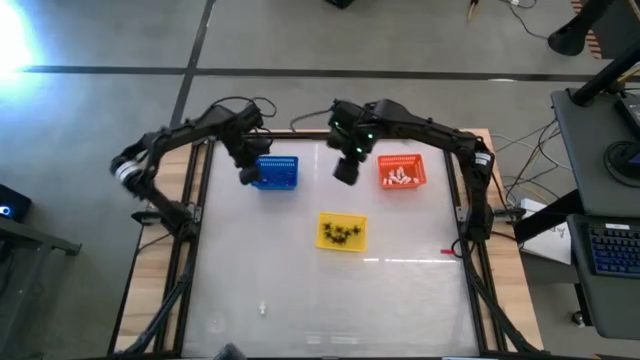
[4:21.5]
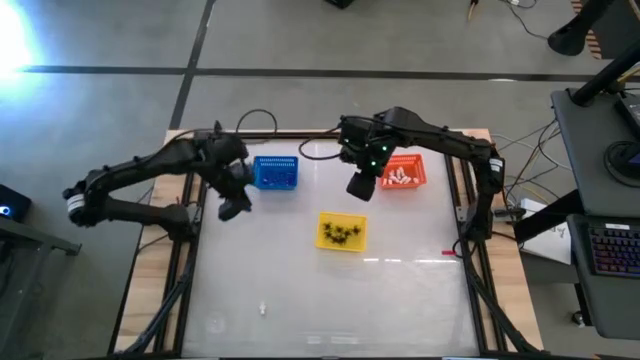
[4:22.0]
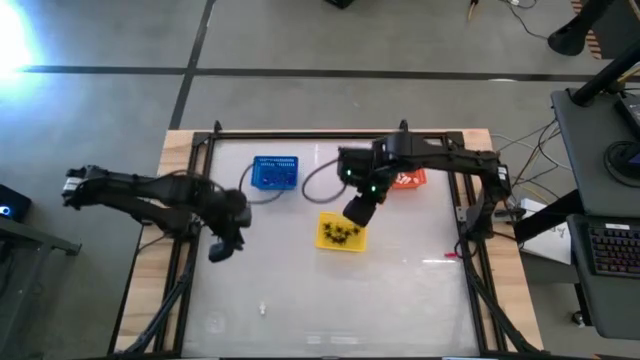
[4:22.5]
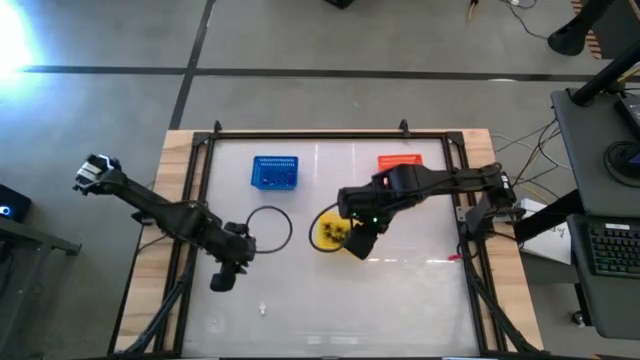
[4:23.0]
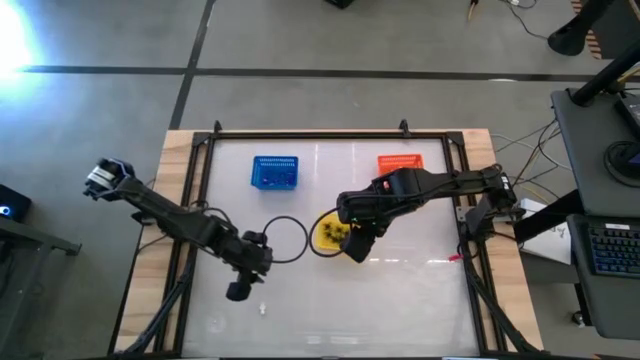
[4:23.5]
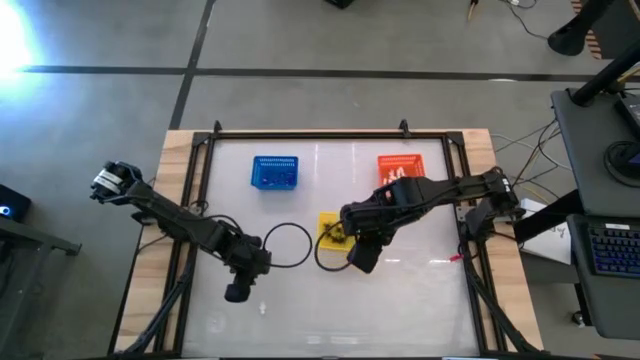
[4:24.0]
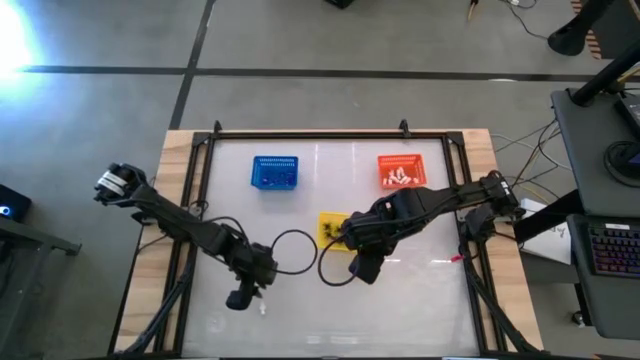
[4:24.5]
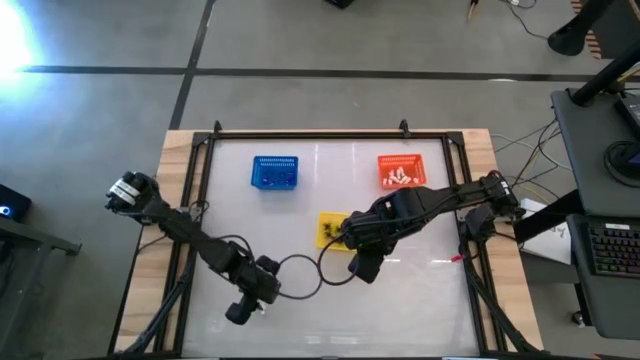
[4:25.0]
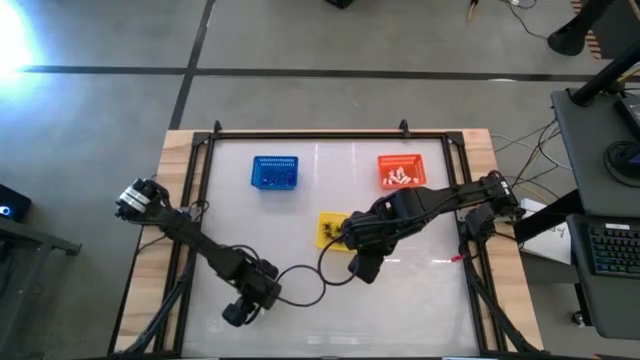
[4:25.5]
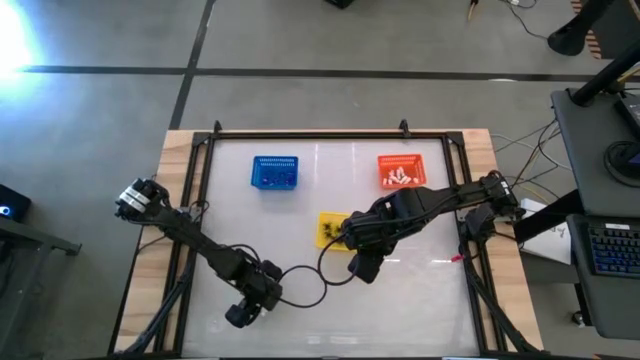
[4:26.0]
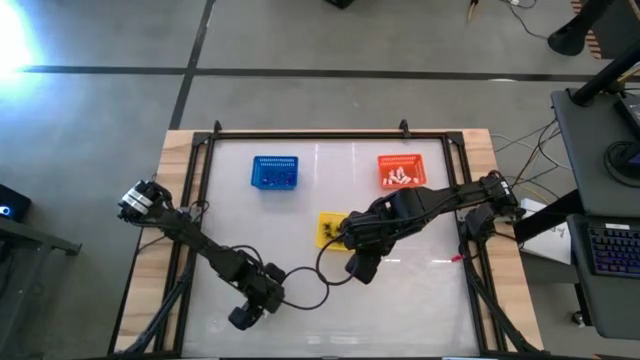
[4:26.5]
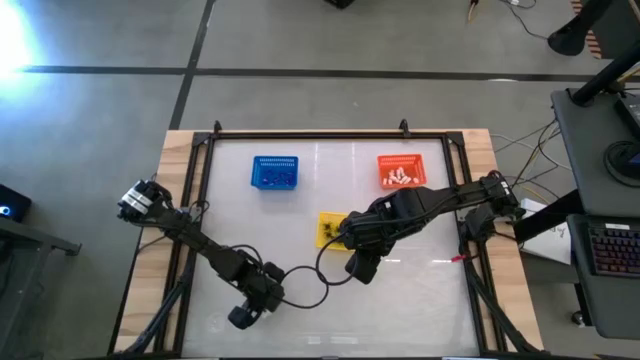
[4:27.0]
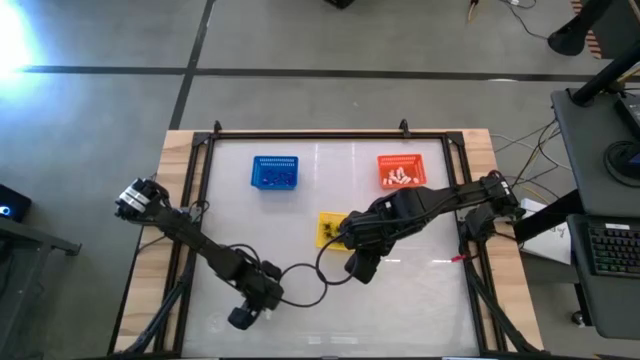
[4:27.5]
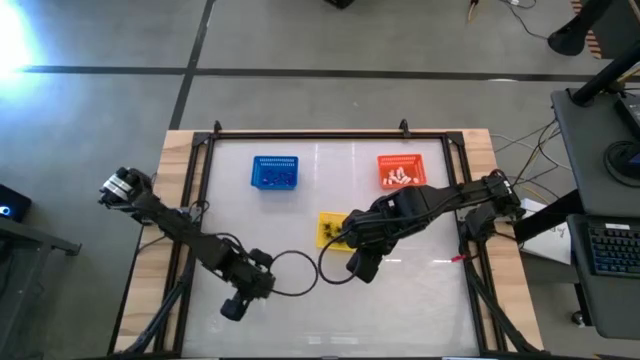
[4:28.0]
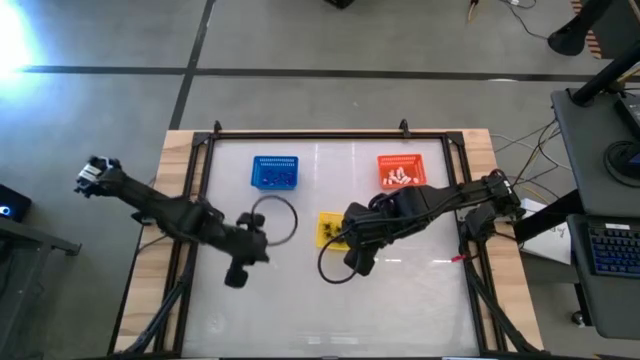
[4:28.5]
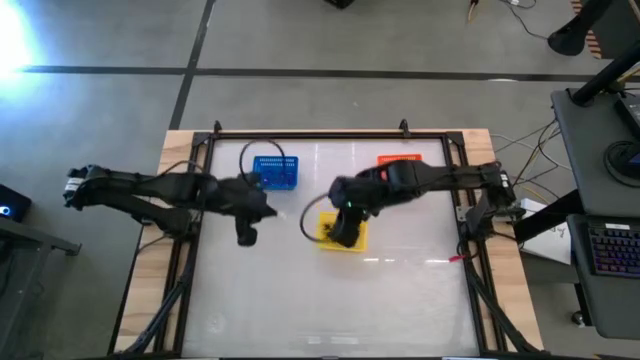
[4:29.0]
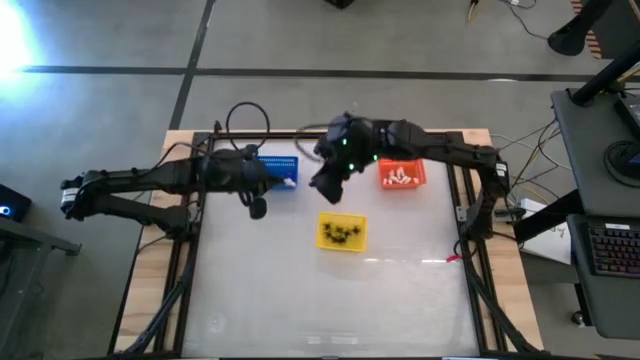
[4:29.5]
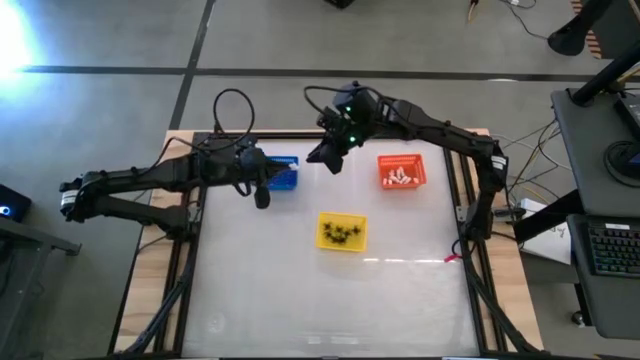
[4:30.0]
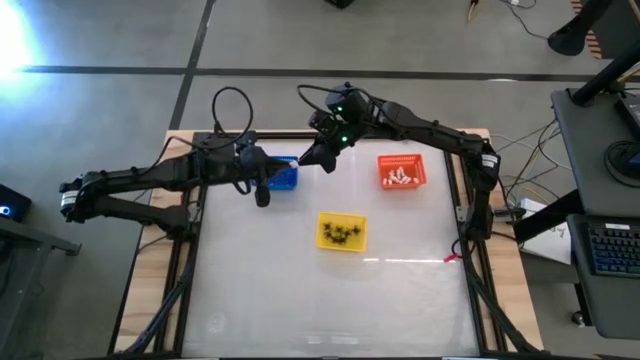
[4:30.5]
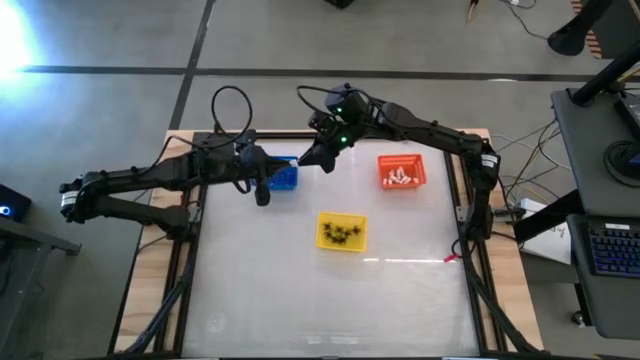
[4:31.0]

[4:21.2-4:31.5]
Task: Sort Halloween decoration
Put the white skeleton toy into the orange bin

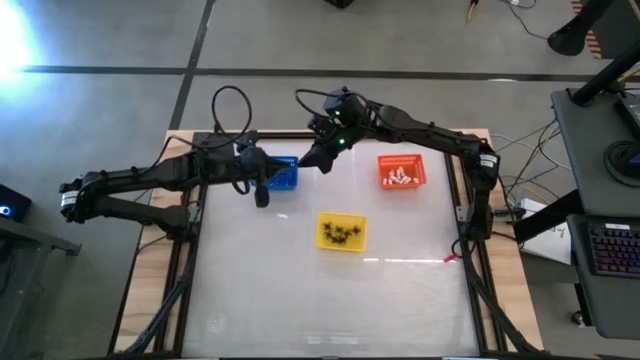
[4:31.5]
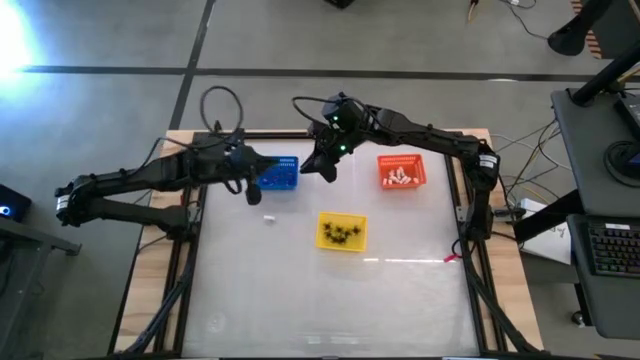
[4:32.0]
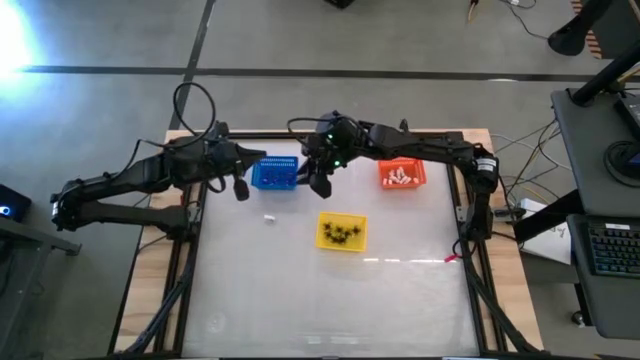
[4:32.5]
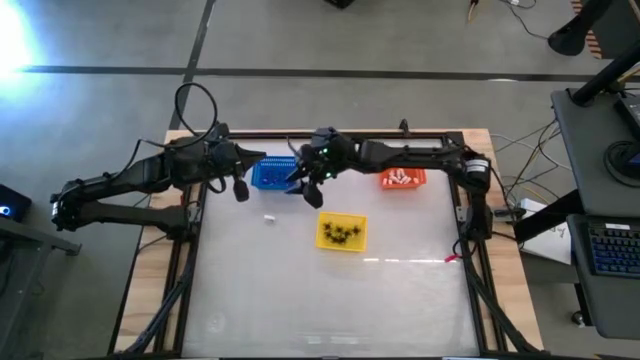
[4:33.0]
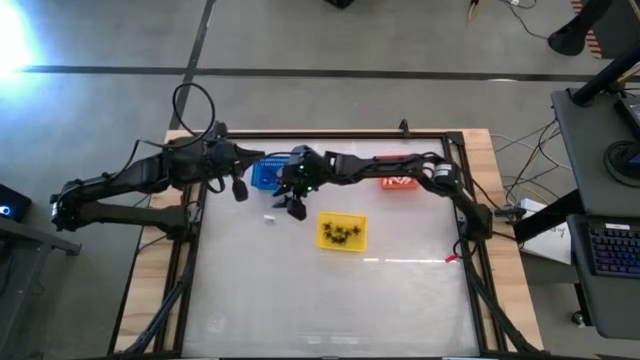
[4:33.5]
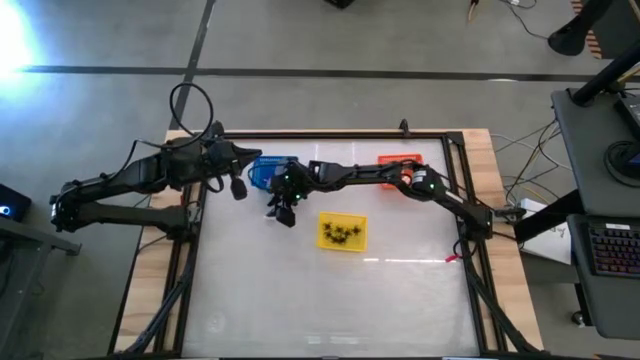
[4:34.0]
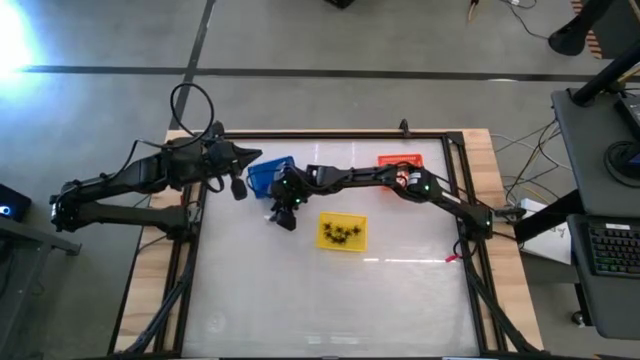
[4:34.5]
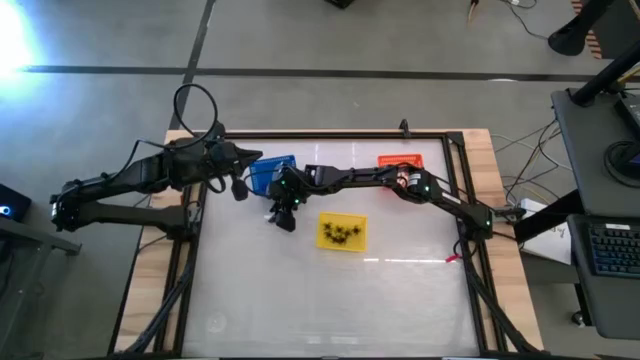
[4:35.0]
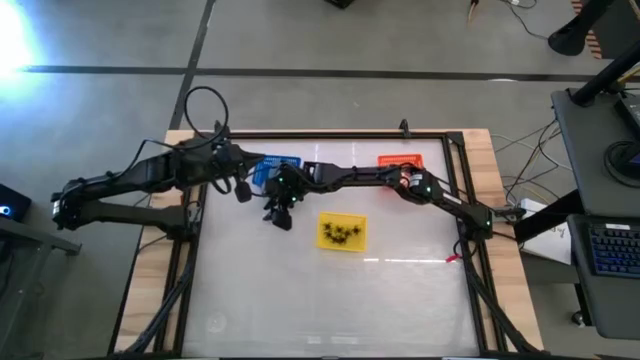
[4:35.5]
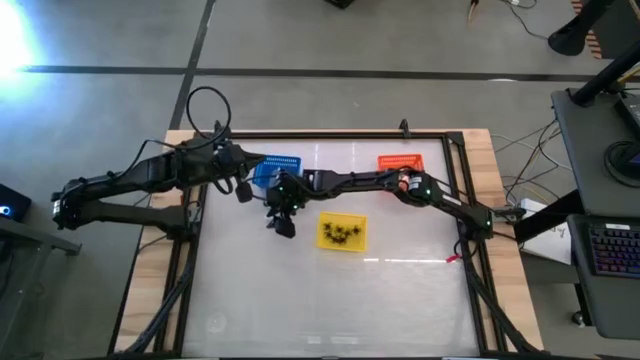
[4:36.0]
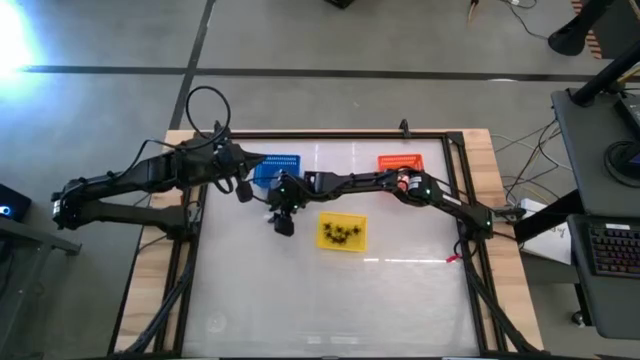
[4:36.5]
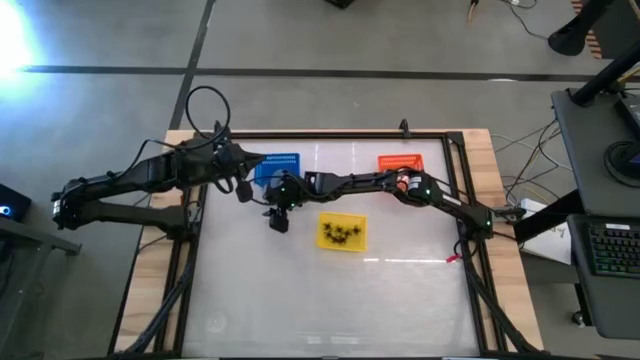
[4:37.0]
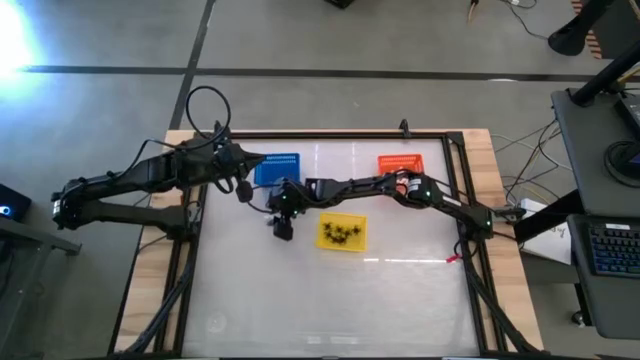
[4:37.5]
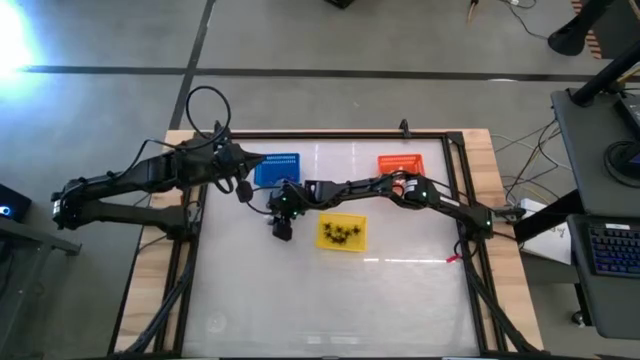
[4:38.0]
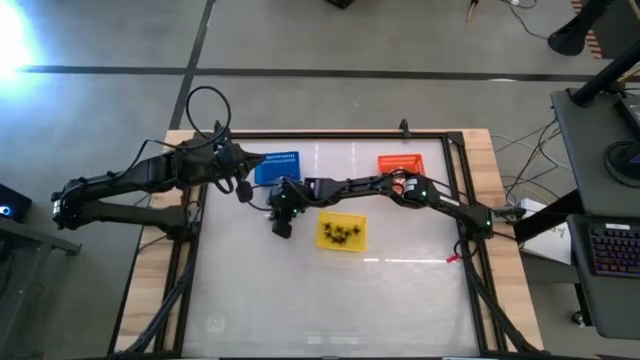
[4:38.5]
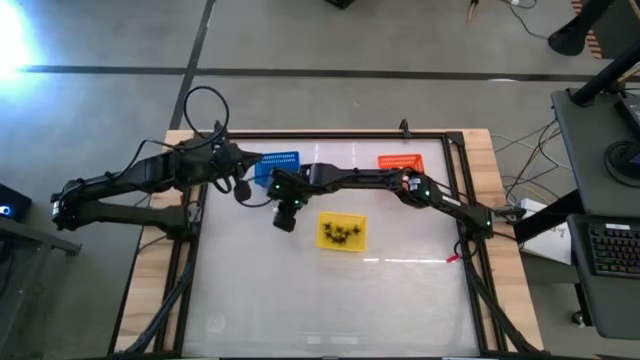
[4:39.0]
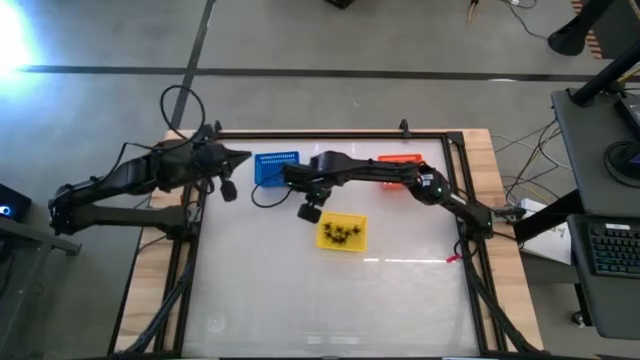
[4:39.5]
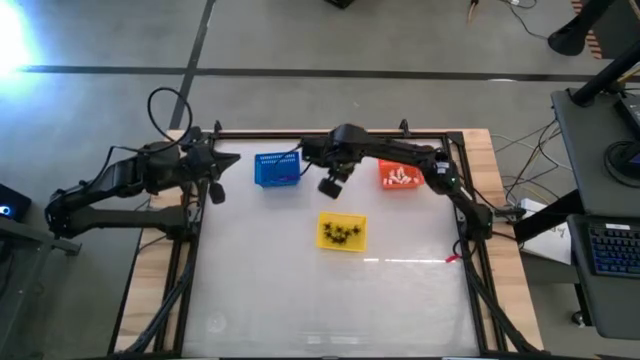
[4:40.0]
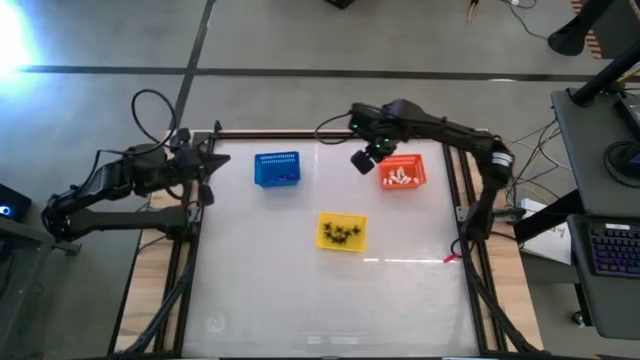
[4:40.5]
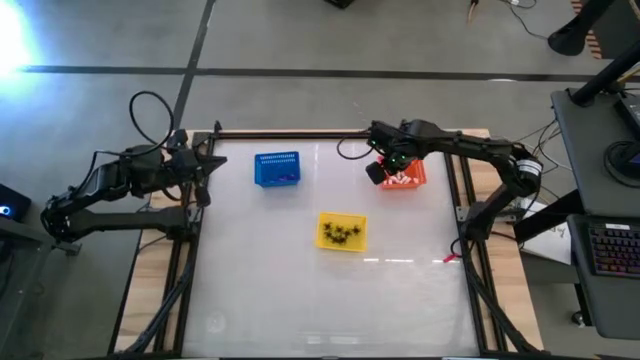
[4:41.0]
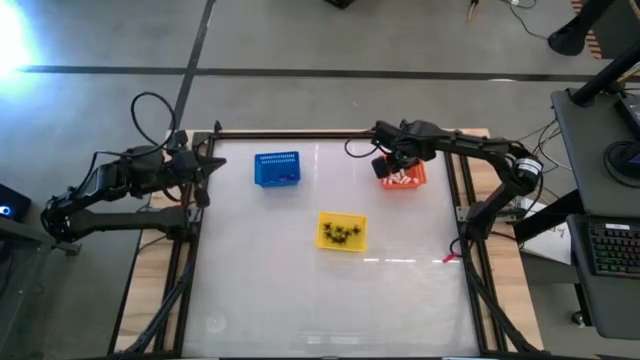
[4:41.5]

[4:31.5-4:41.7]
Put the white skeleton toy into the orange bin

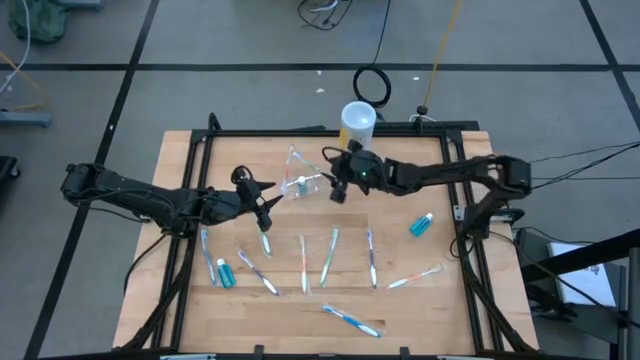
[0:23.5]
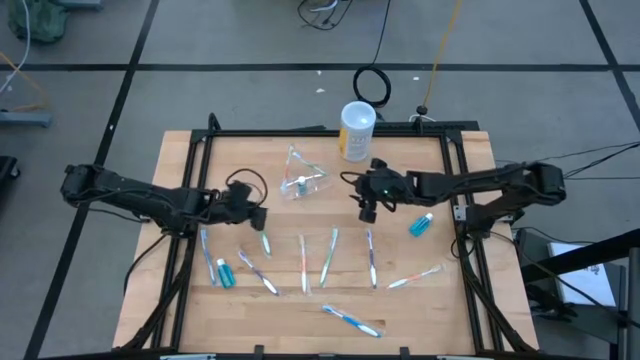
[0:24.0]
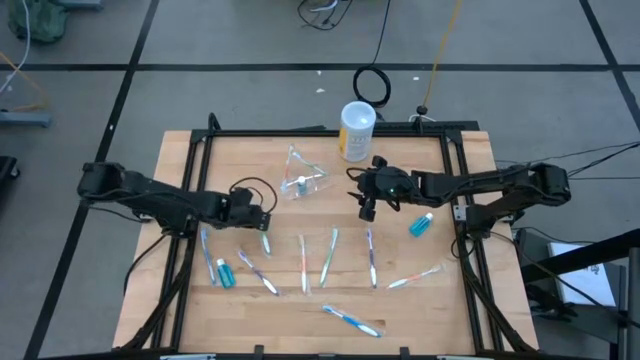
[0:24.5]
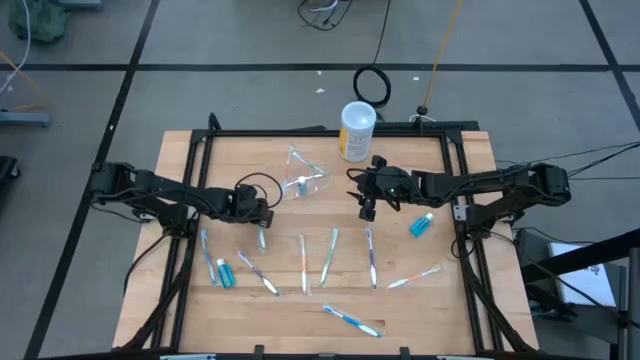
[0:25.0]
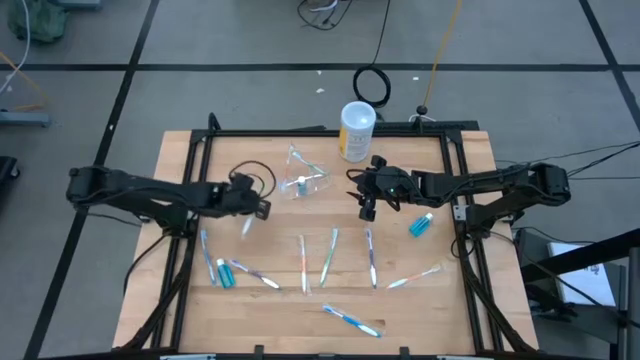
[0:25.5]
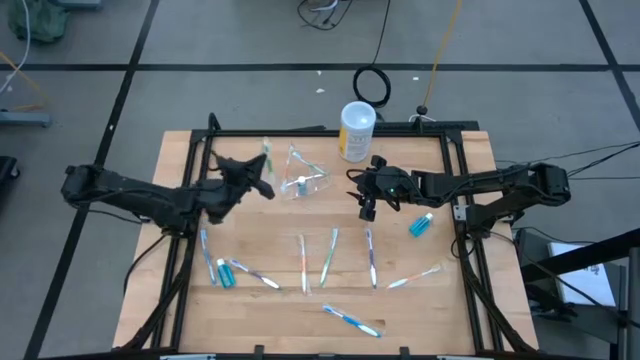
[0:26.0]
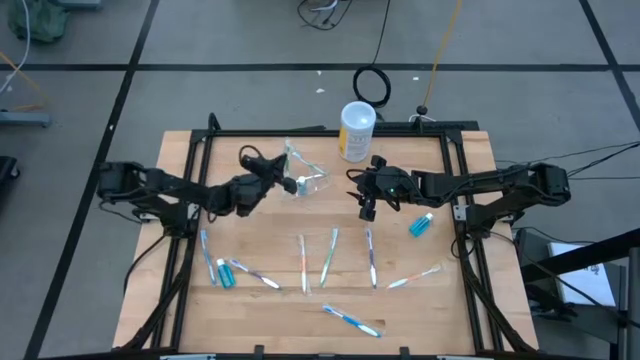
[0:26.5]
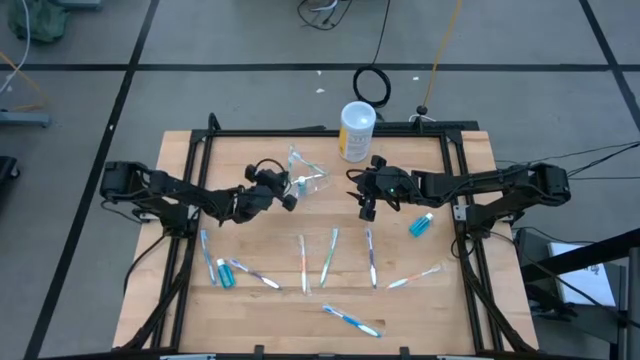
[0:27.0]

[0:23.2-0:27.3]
Task: Pick & Place toothbrushing station
Put the left green toothbrush into the transparent organizer
